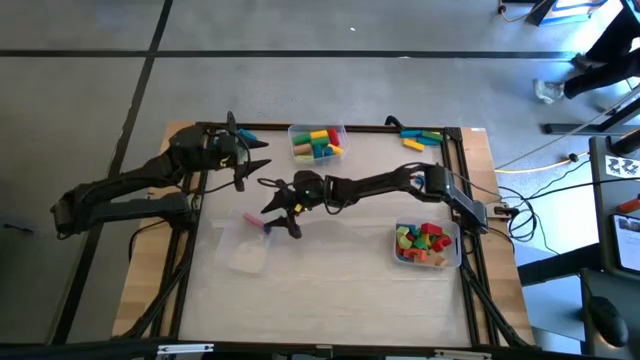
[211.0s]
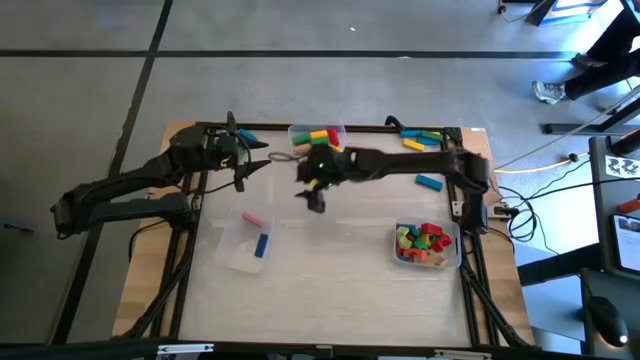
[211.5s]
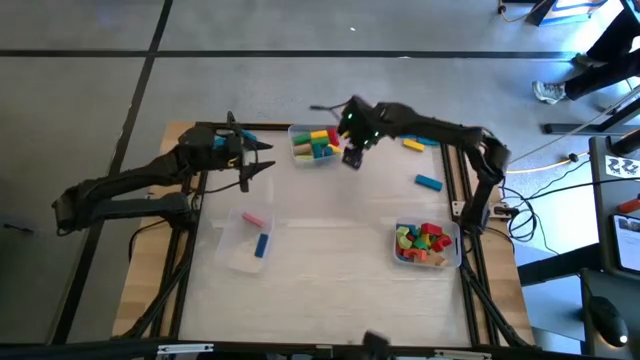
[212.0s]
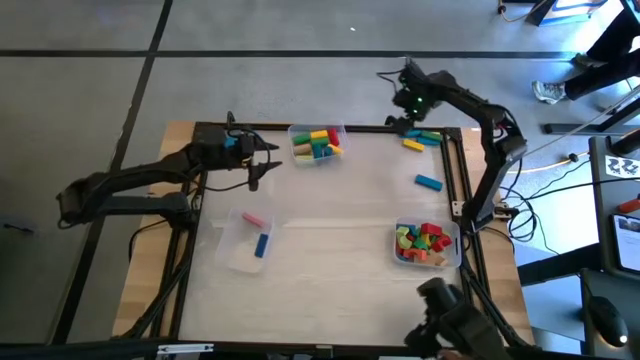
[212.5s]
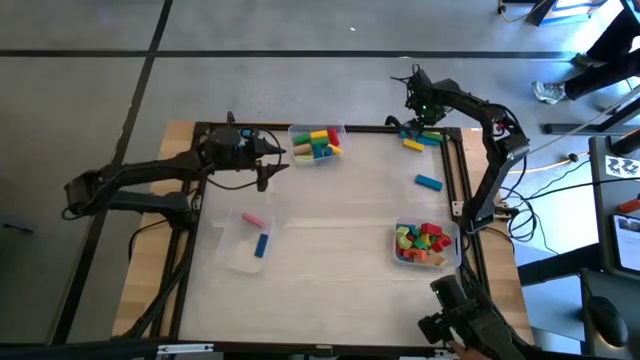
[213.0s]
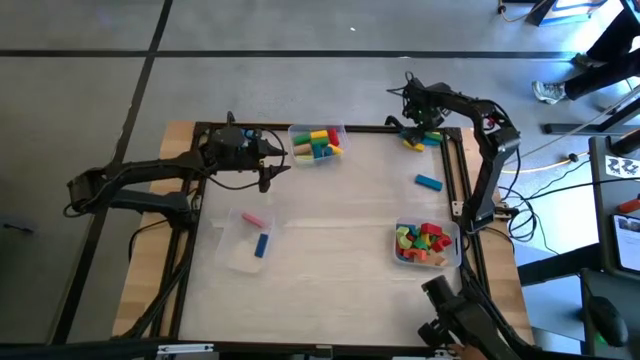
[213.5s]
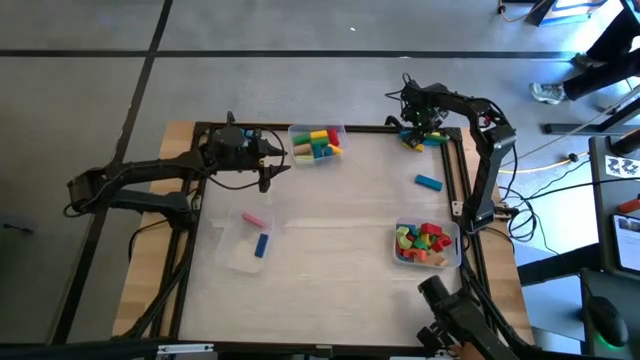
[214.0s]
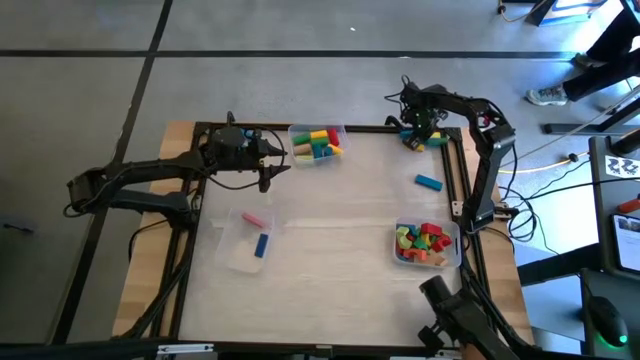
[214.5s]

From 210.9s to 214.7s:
Task: Sort blocks by size
Put the green rectangular block into the bottom left transparent bin

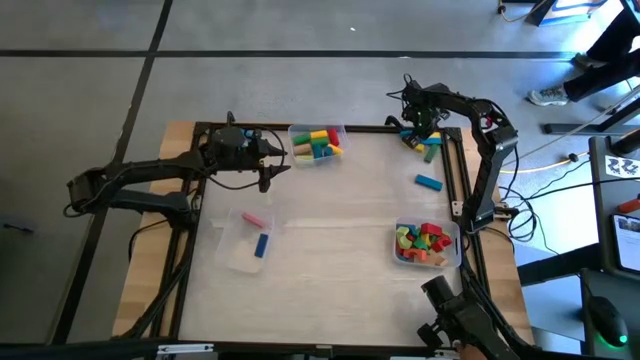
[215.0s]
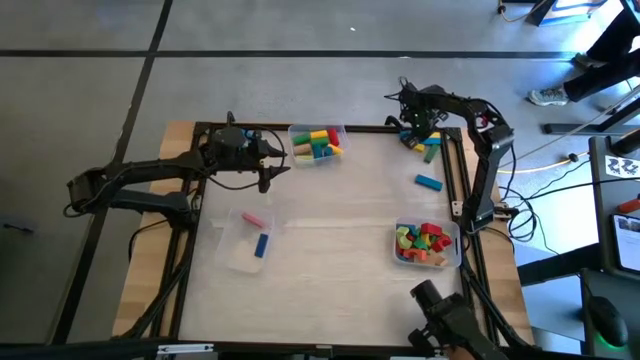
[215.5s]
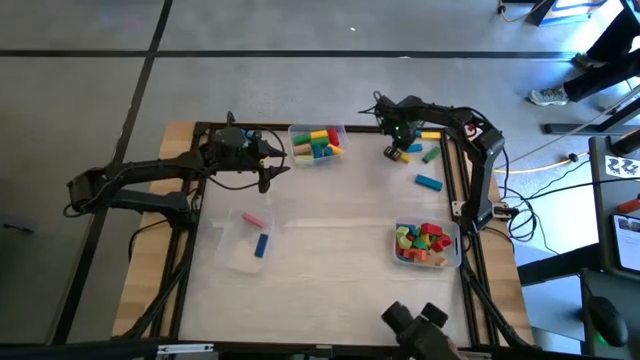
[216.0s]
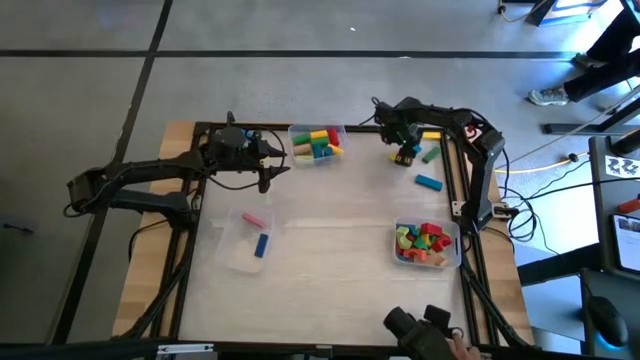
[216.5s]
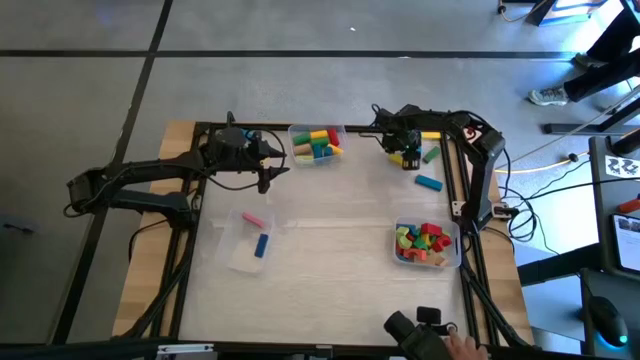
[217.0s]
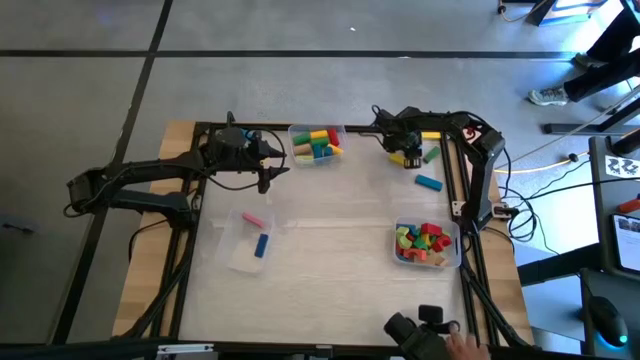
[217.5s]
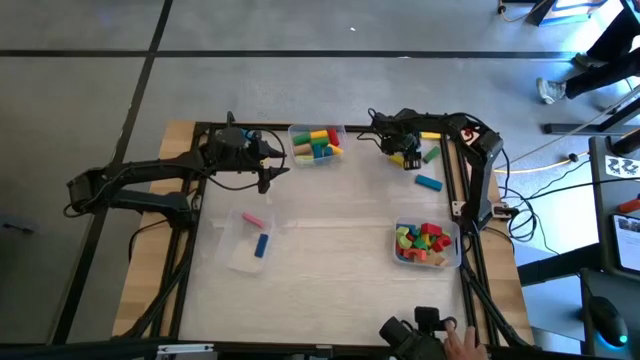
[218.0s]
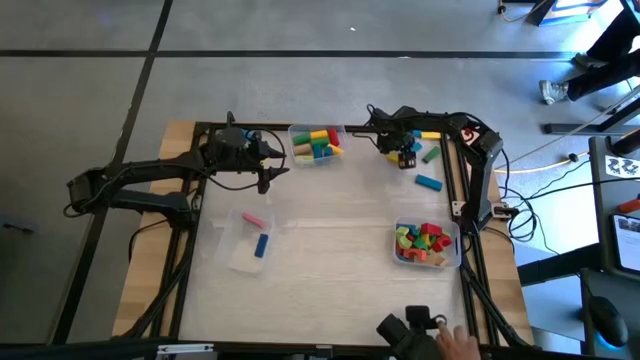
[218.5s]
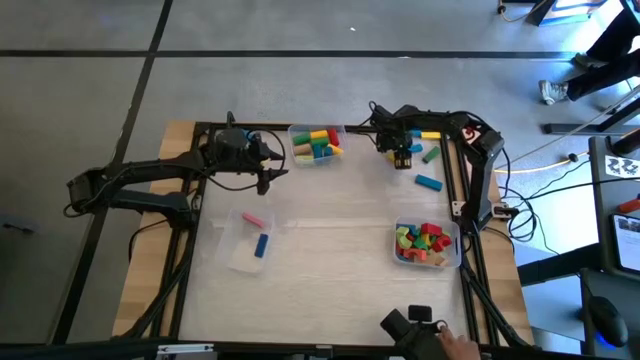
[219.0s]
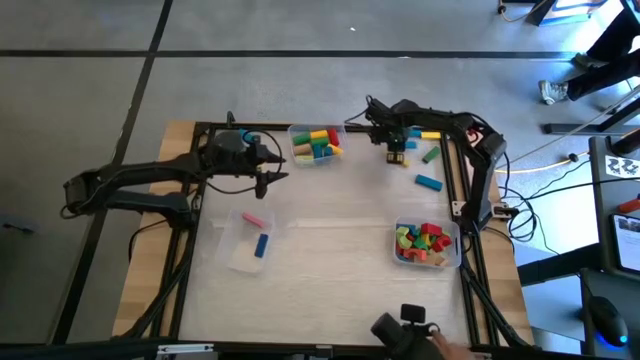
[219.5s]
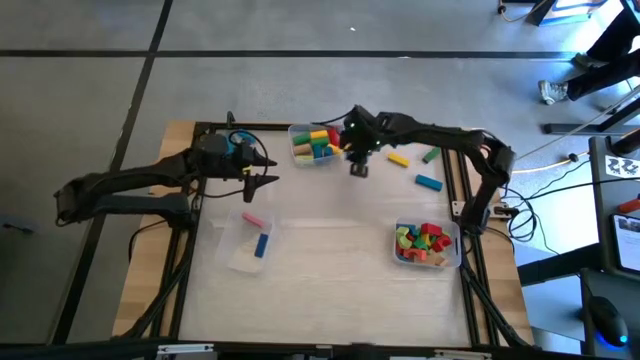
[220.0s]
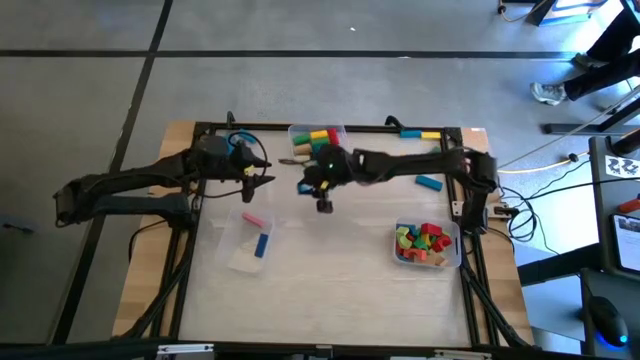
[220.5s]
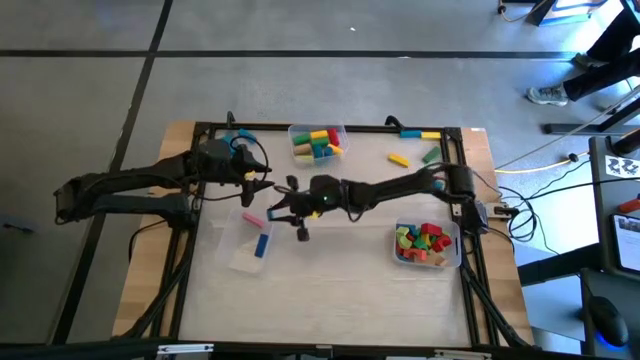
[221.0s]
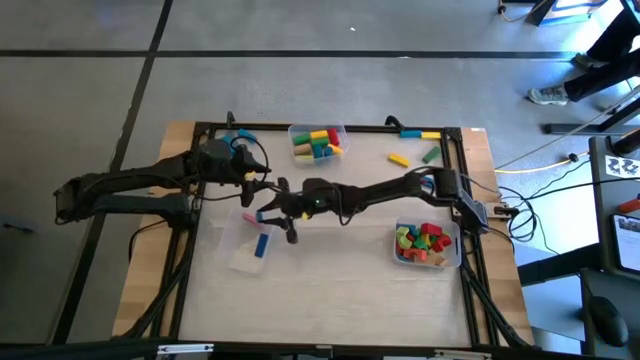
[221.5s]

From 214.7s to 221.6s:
Put the blue rectangular block into the bottom left transparent bin

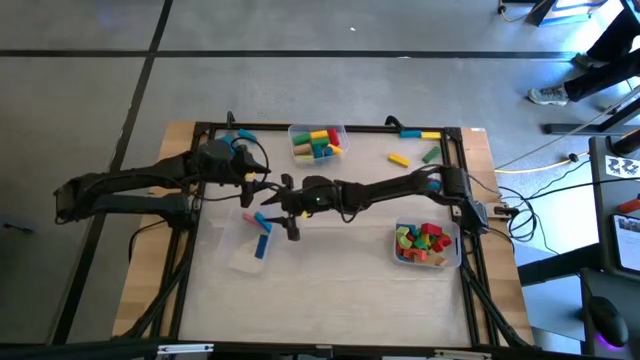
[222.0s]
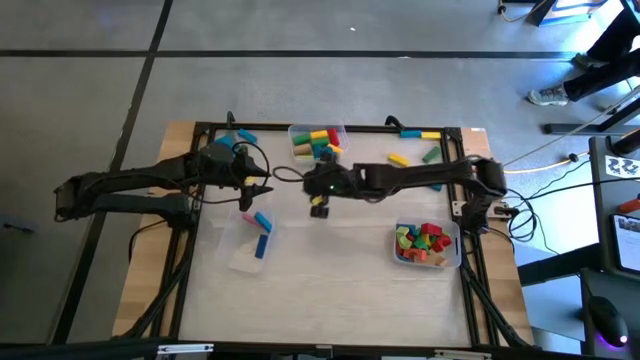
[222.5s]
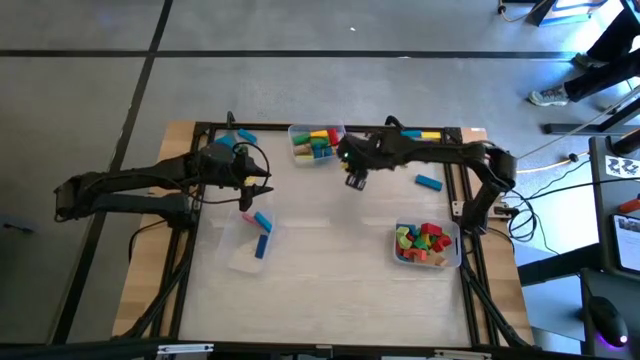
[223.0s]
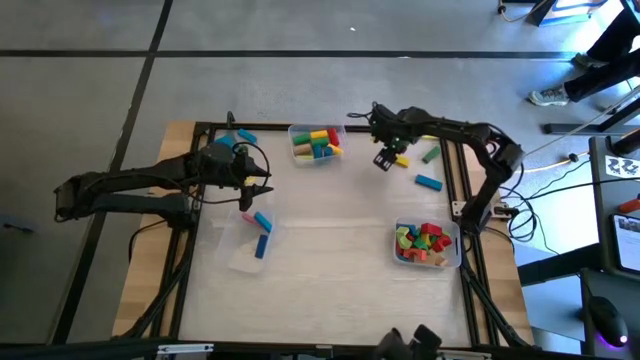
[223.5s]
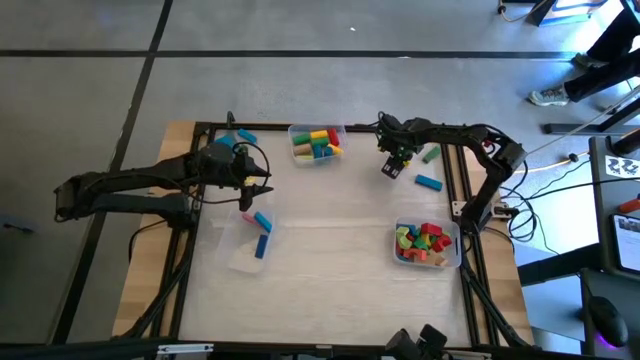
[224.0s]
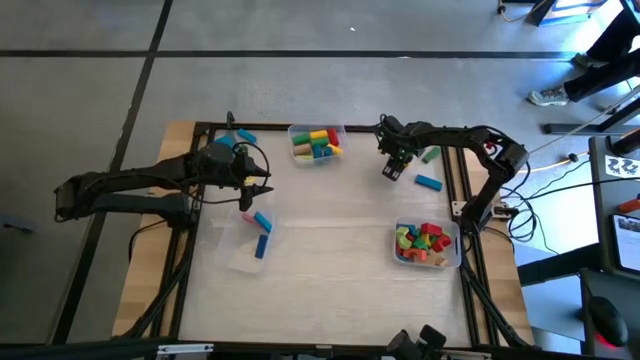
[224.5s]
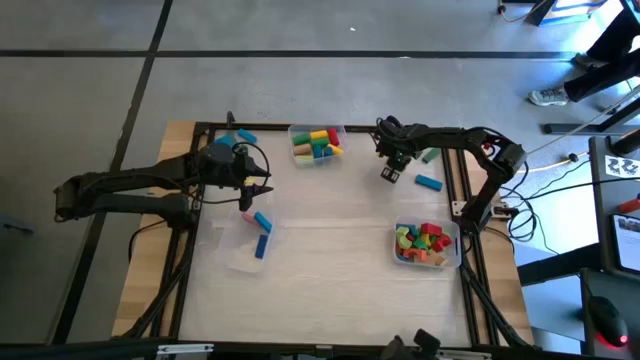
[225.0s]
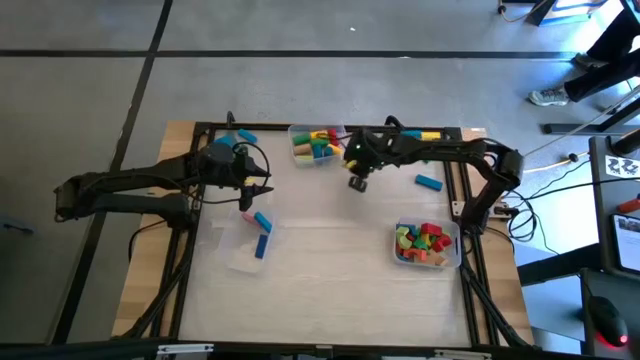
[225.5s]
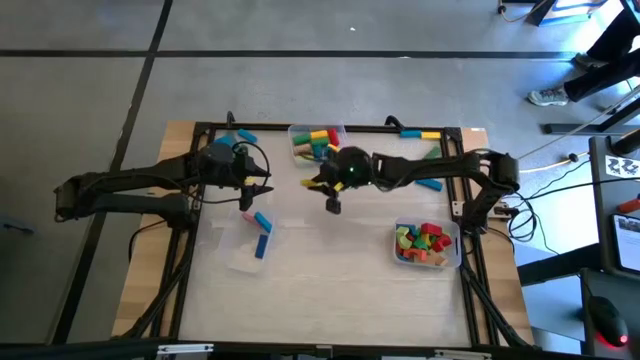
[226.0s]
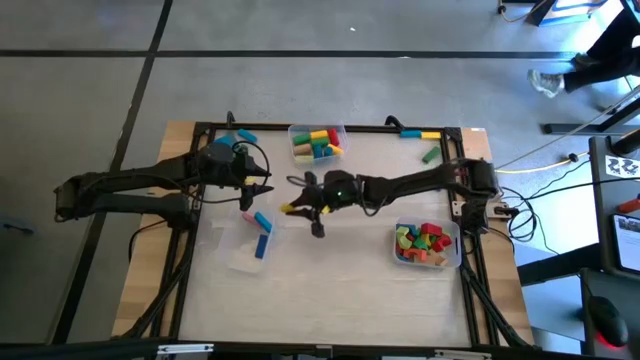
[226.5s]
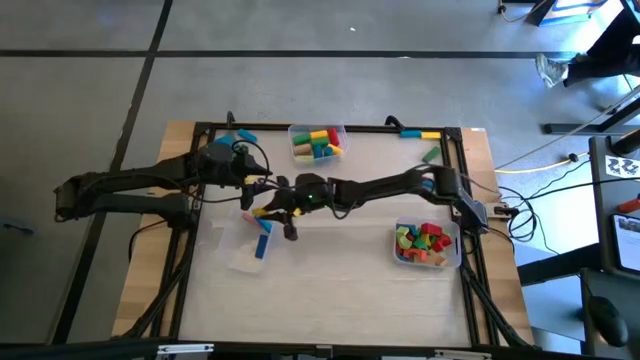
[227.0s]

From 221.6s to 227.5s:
Put the yellow rectangular block into the bottom left transparent bin

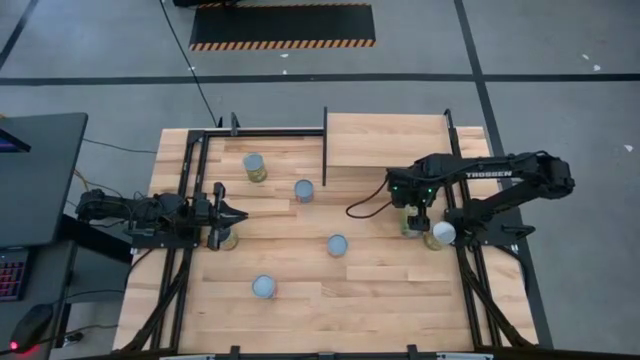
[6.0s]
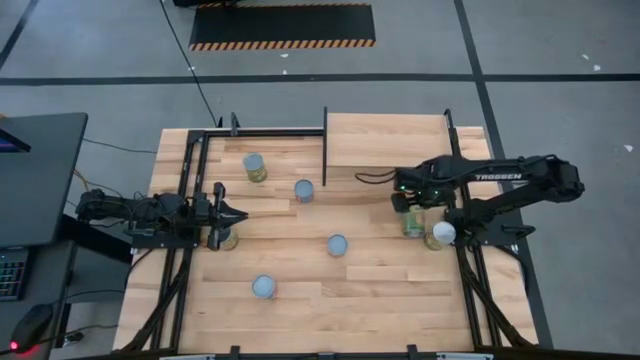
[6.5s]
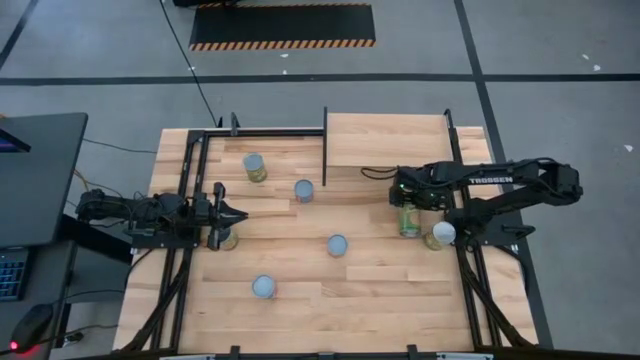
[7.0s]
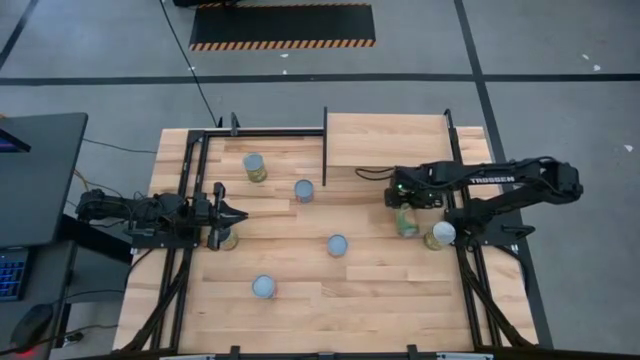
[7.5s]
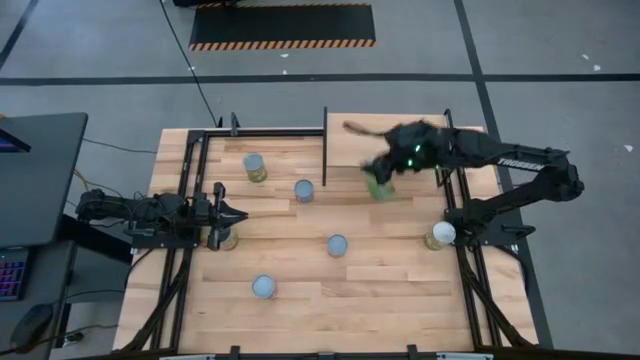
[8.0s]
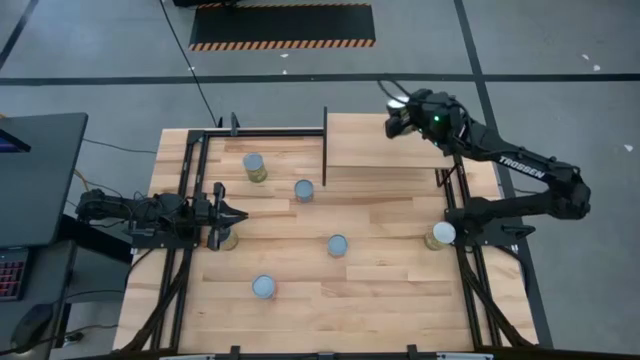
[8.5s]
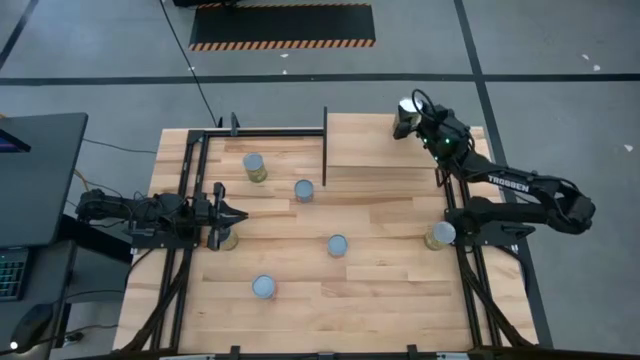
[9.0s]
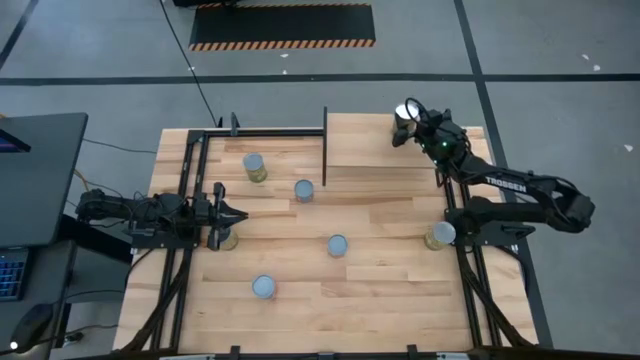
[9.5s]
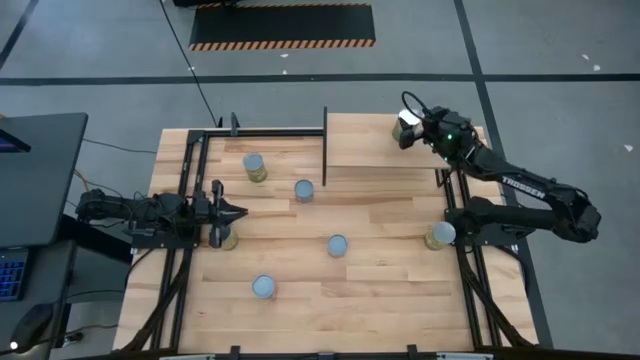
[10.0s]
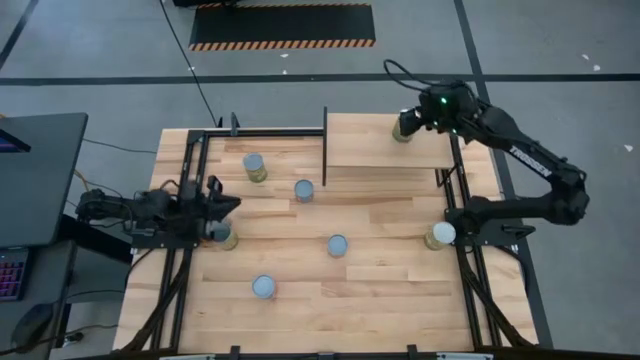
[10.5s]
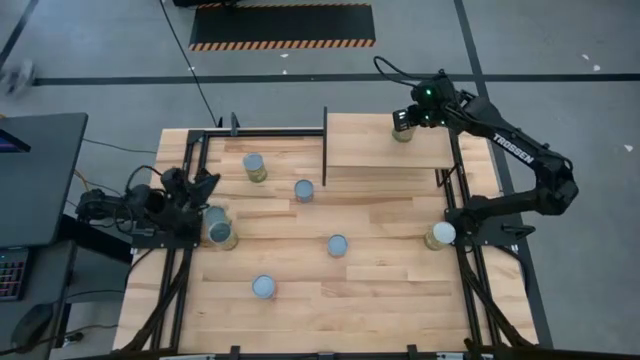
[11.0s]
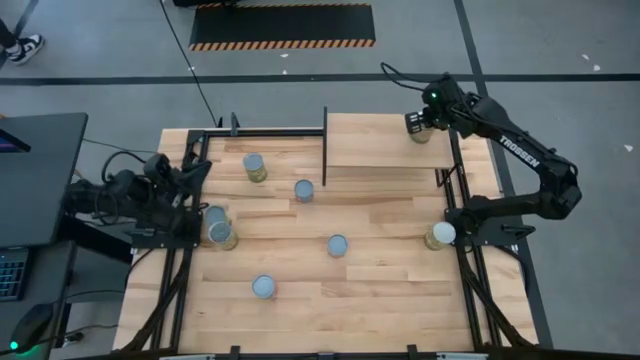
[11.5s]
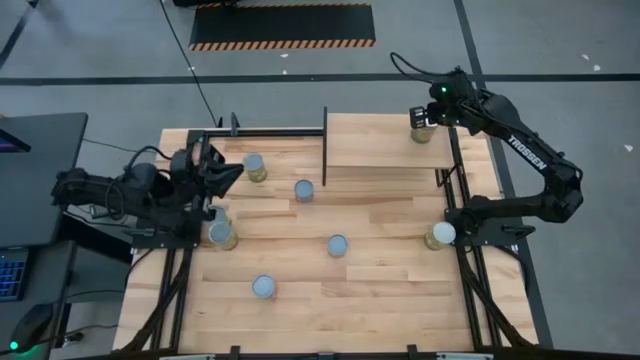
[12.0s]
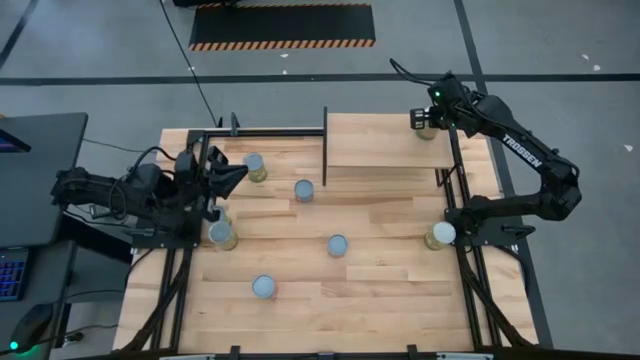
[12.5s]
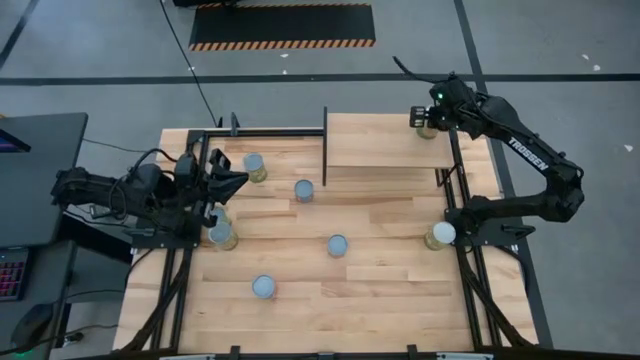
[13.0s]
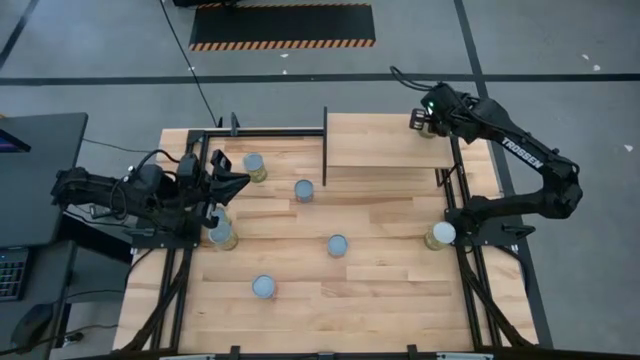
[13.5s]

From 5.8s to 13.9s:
Task: Pick and place cans onto a shelf
Put the right large canned oranges can on the shelf
